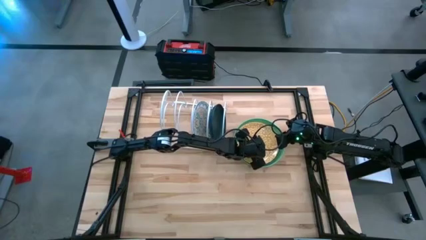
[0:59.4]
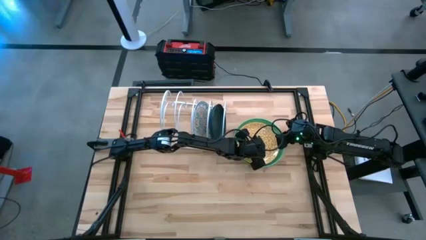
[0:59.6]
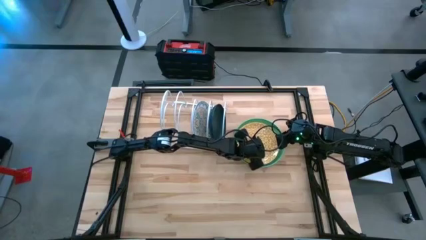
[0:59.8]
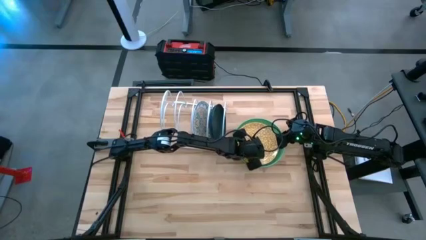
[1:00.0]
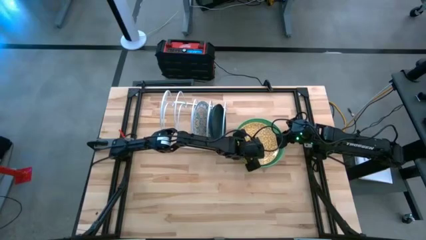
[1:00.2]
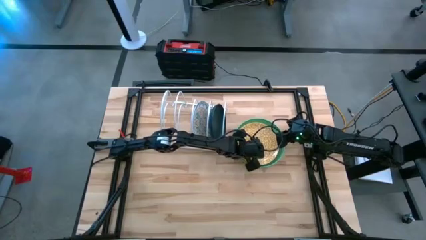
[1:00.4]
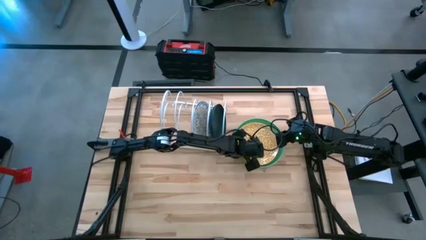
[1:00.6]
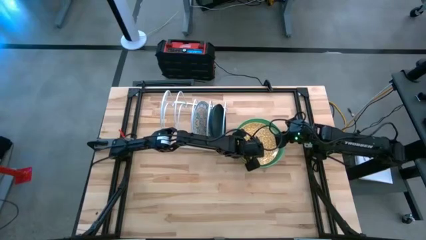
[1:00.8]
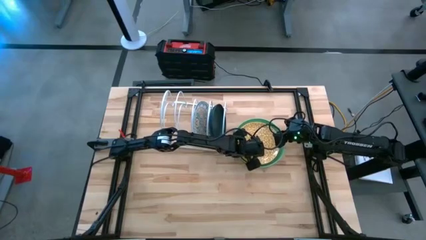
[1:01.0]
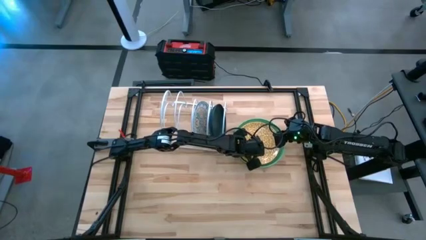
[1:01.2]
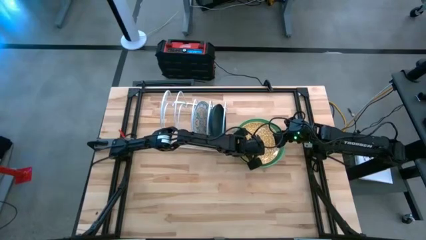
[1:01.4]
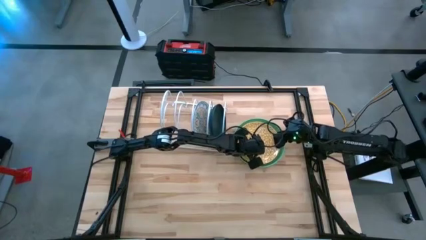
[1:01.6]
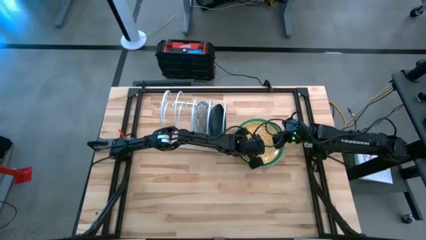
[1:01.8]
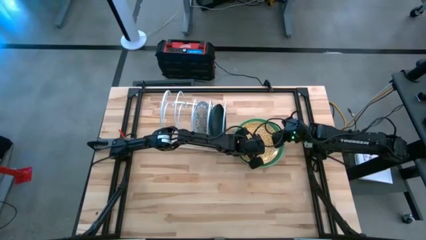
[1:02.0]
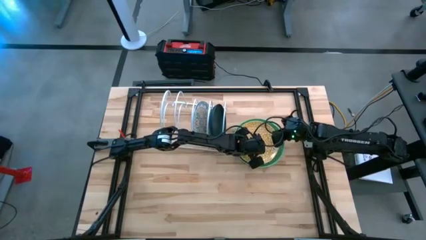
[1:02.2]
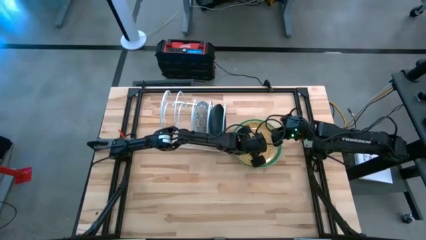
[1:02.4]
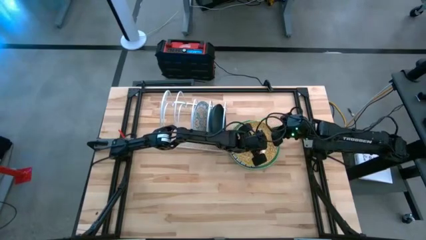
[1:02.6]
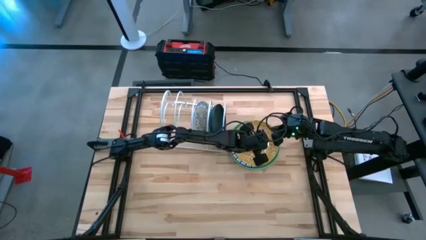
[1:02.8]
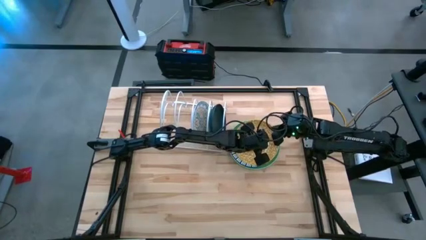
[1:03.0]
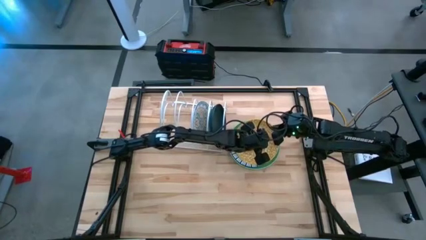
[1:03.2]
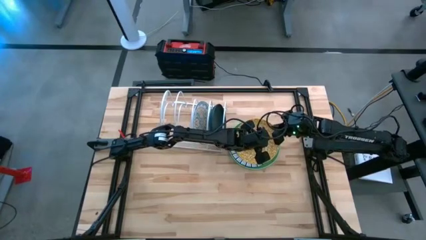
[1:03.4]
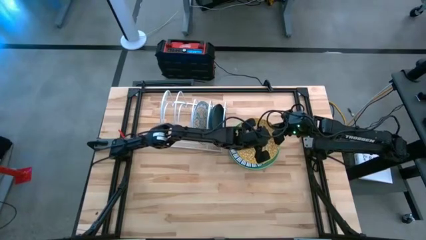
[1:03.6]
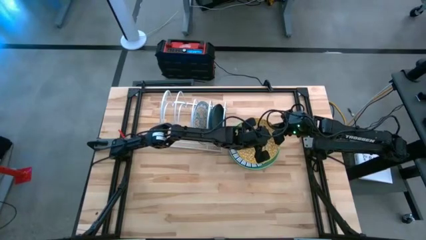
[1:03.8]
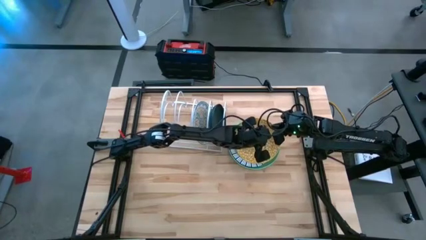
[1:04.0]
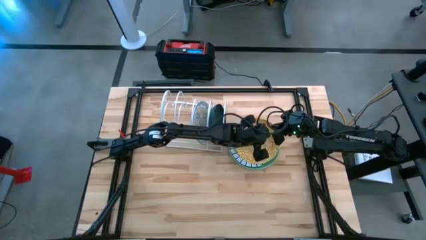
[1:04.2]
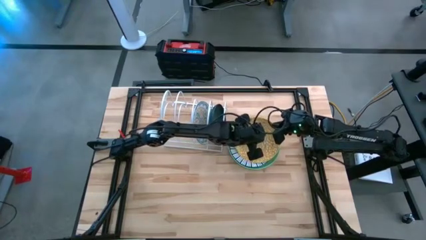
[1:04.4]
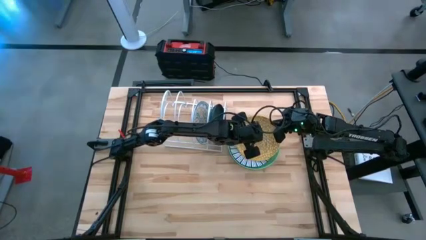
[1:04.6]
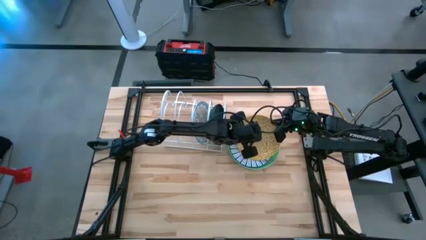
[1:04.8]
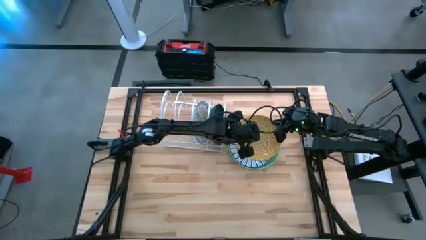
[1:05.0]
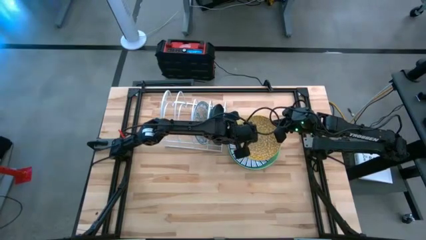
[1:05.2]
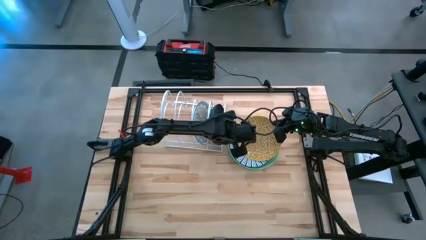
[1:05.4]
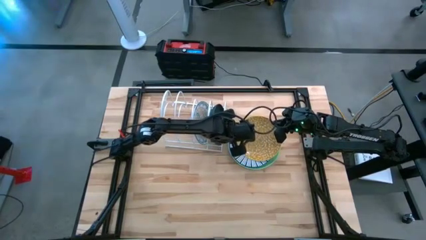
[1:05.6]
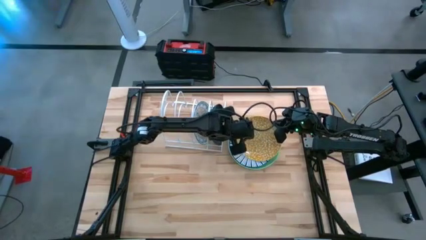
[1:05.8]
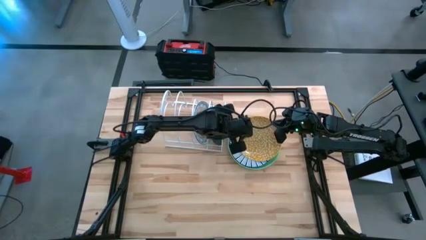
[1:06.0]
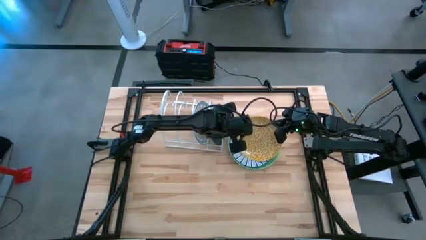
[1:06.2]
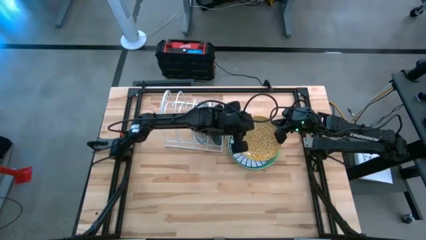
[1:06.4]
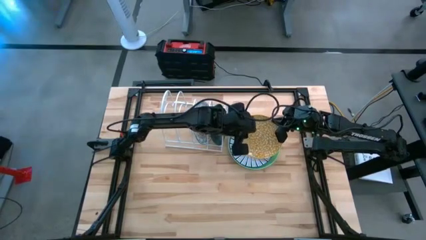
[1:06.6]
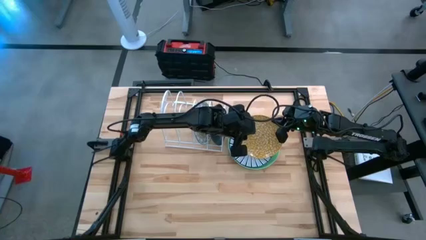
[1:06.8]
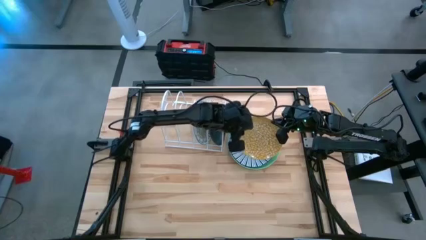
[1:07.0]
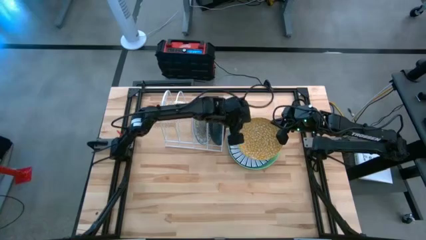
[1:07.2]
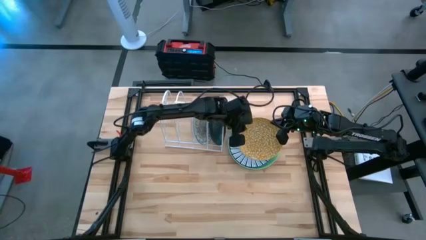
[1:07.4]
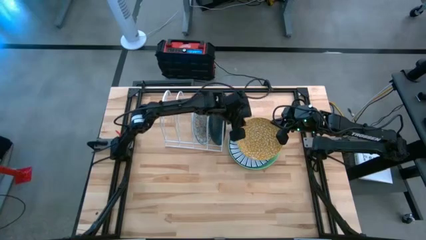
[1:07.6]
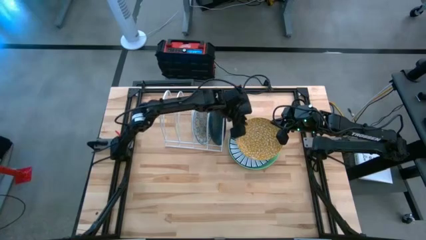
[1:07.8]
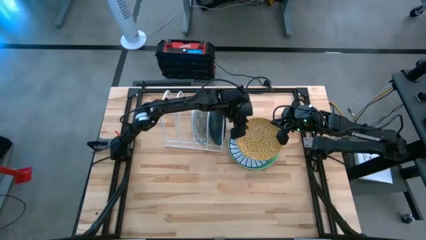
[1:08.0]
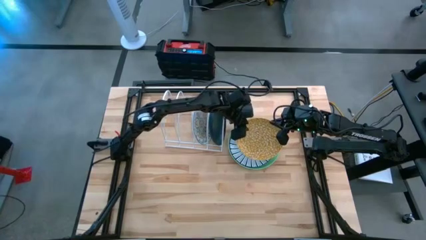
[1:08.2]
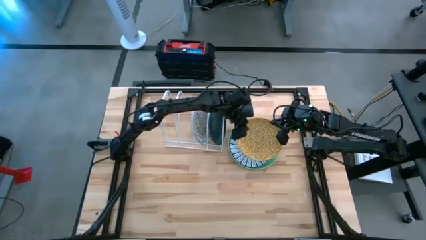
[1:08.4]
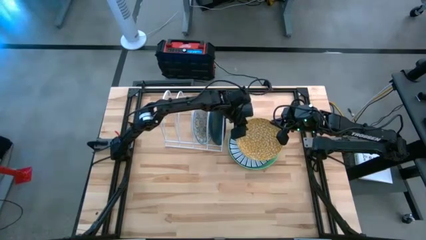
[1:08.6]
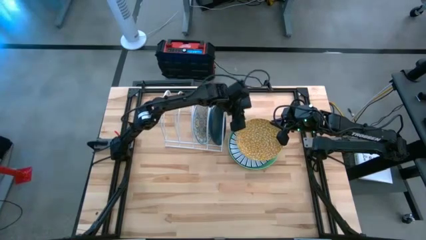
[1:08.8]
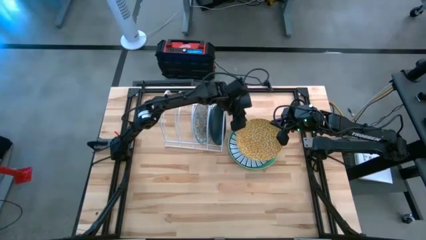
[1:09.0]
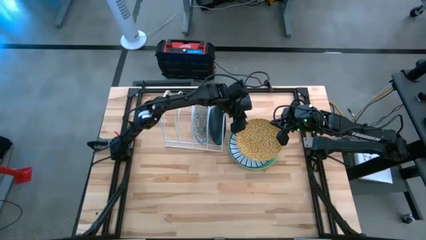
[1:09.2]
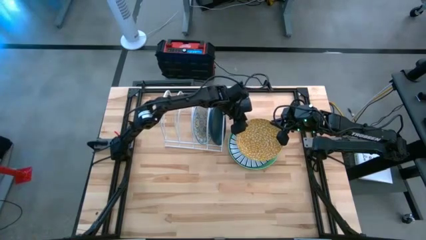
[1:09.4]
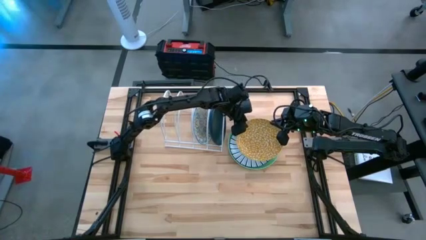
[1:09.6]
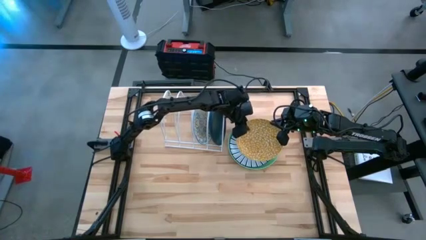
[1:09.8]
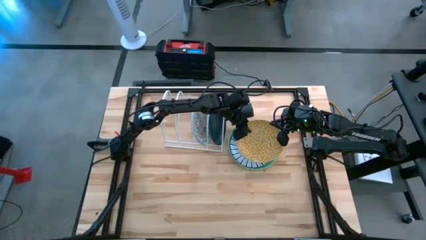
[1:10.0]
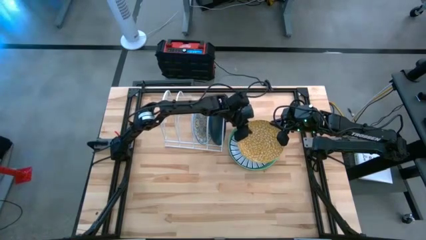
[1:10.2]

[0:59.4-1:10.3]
Task: Sort dishes
Put the yellow plate in the dish rack
